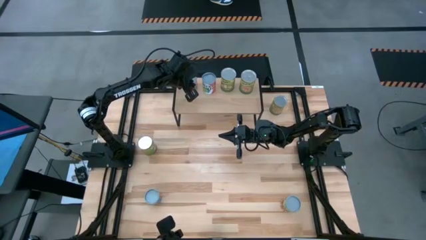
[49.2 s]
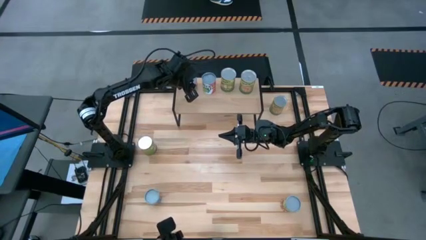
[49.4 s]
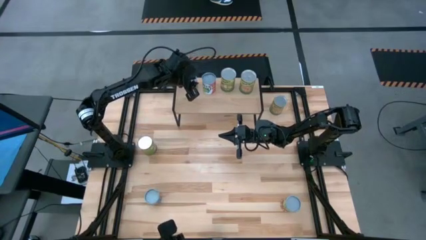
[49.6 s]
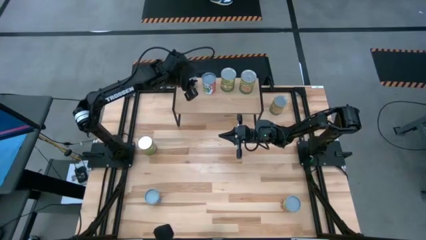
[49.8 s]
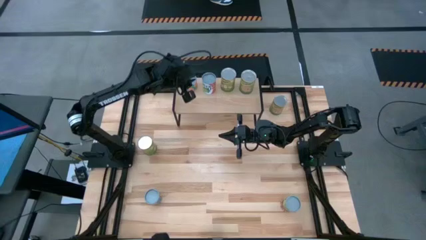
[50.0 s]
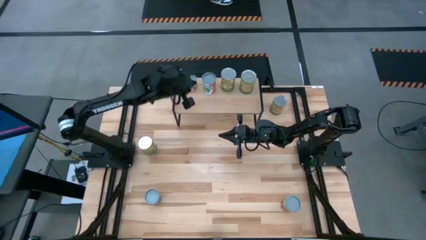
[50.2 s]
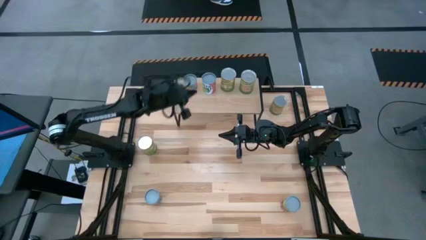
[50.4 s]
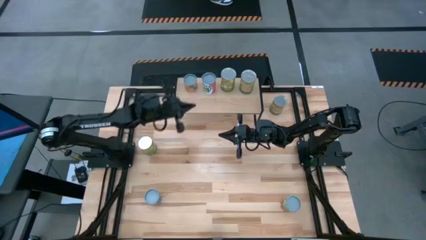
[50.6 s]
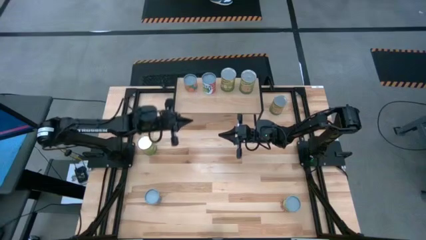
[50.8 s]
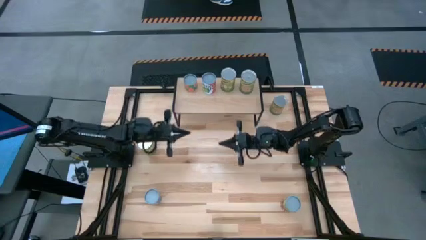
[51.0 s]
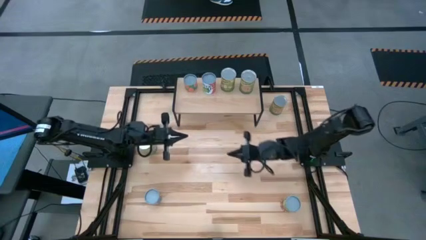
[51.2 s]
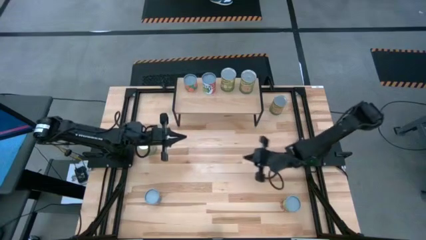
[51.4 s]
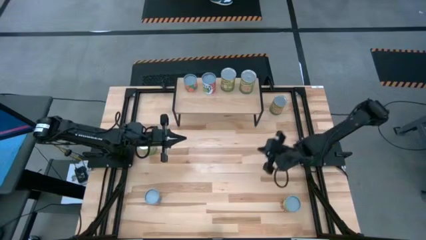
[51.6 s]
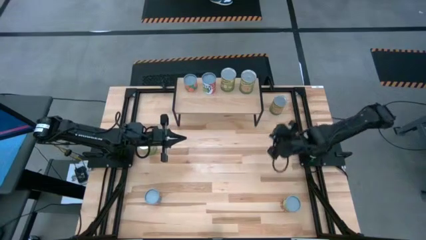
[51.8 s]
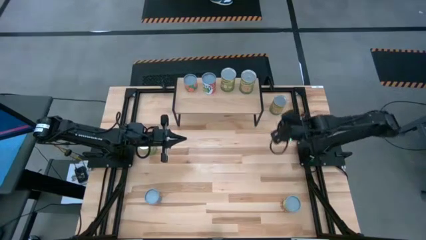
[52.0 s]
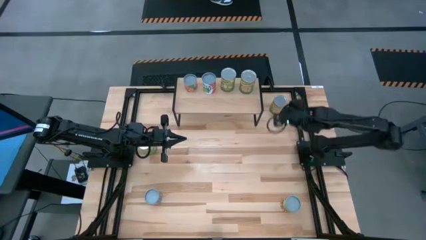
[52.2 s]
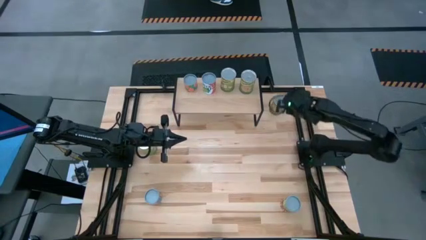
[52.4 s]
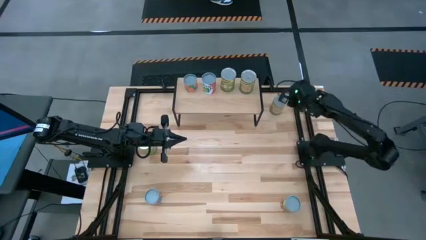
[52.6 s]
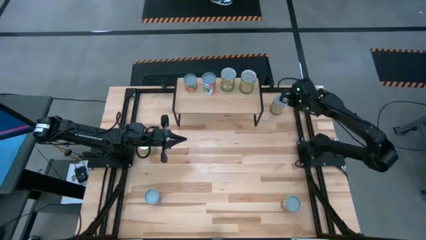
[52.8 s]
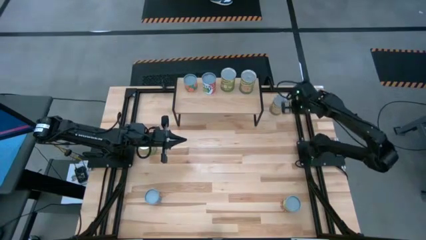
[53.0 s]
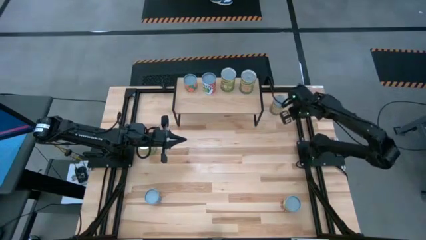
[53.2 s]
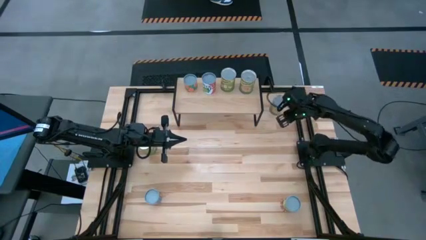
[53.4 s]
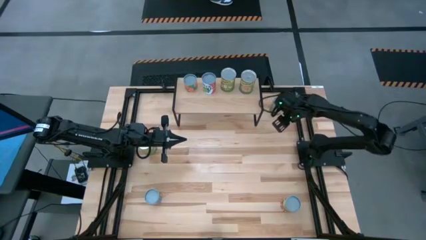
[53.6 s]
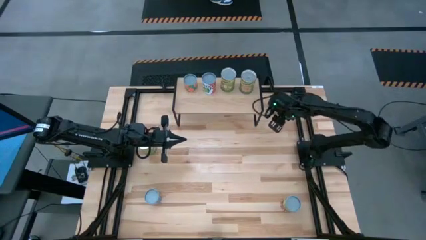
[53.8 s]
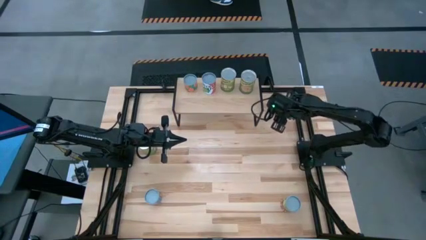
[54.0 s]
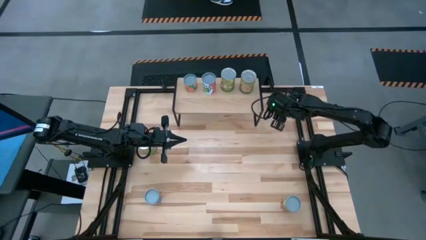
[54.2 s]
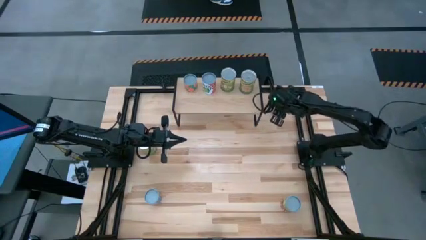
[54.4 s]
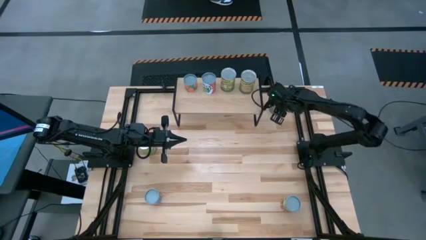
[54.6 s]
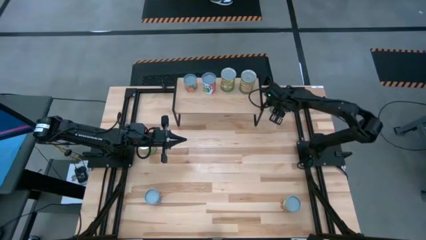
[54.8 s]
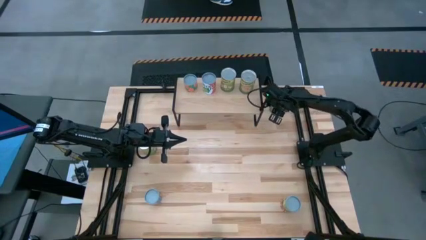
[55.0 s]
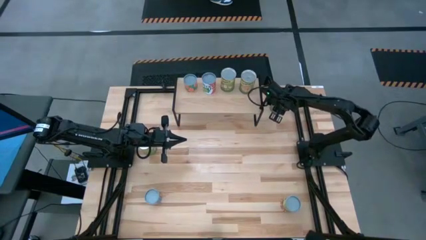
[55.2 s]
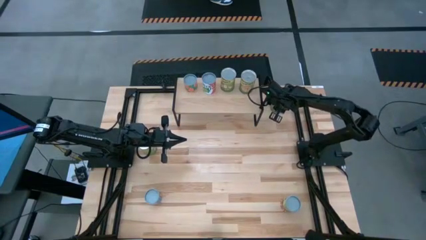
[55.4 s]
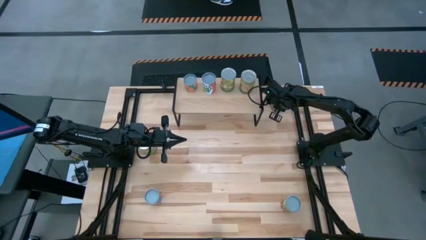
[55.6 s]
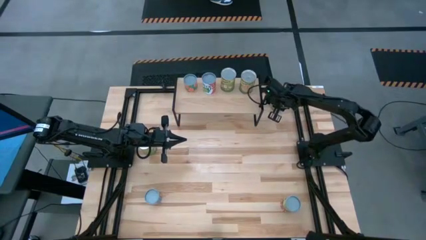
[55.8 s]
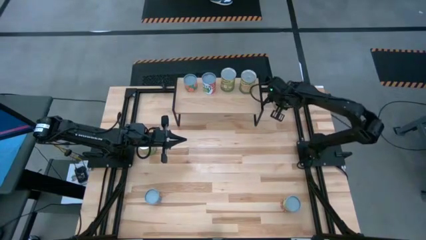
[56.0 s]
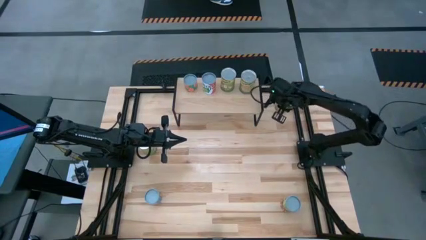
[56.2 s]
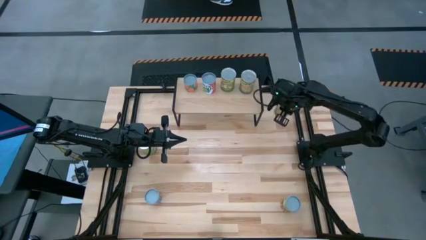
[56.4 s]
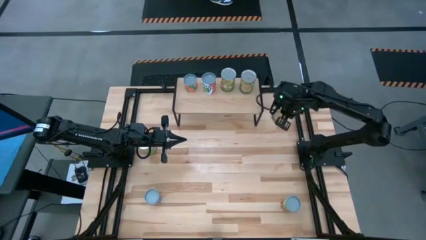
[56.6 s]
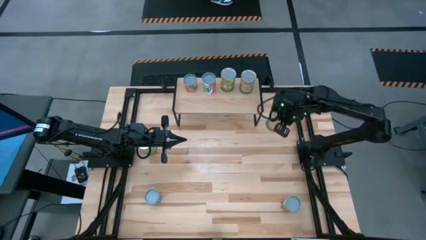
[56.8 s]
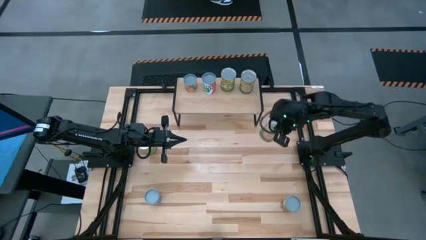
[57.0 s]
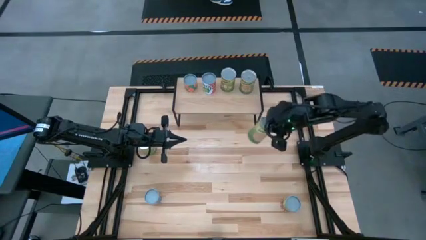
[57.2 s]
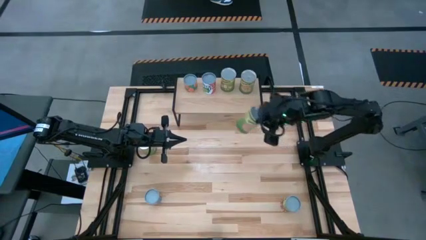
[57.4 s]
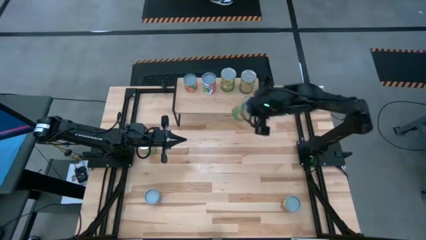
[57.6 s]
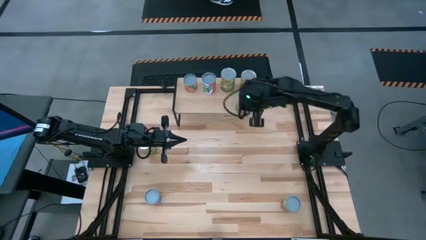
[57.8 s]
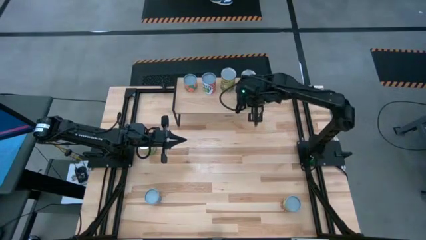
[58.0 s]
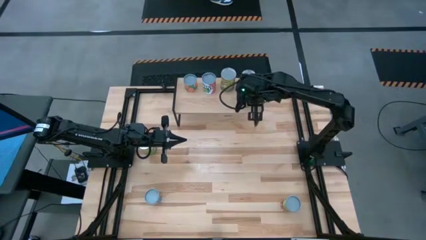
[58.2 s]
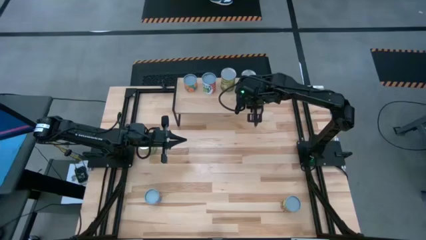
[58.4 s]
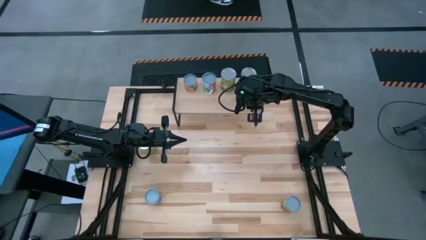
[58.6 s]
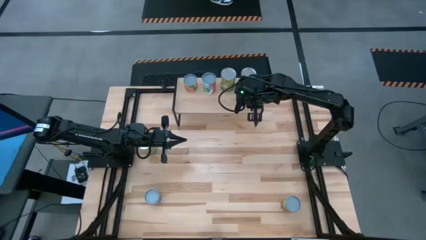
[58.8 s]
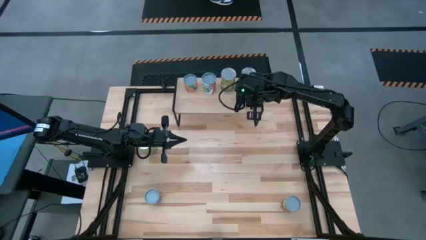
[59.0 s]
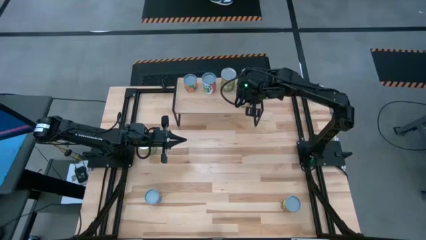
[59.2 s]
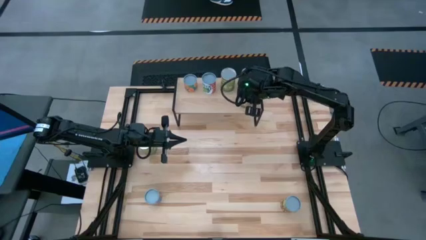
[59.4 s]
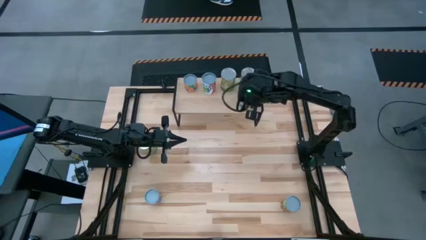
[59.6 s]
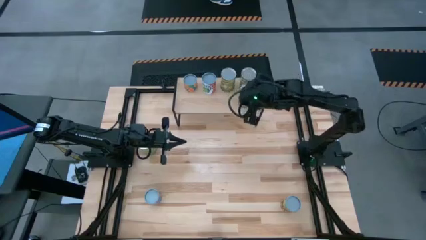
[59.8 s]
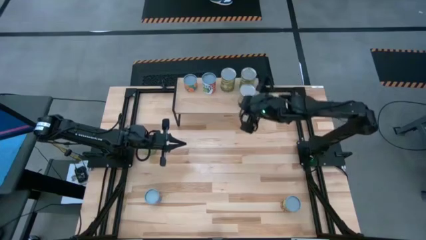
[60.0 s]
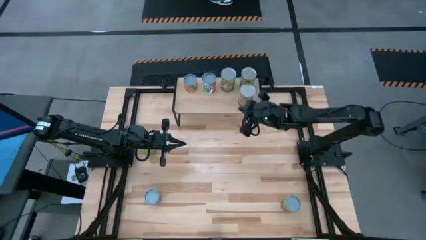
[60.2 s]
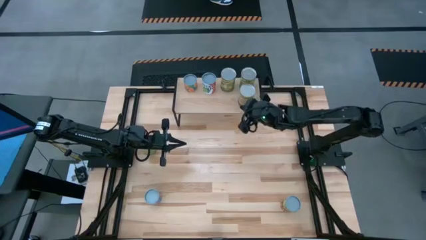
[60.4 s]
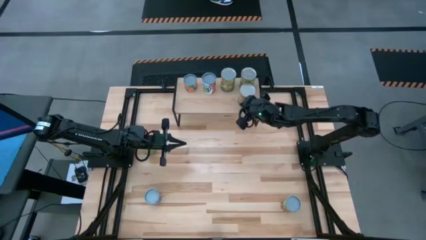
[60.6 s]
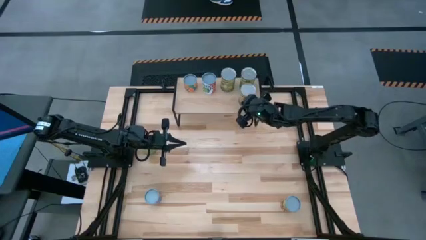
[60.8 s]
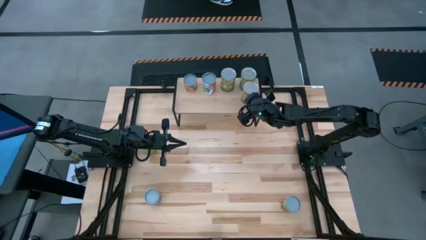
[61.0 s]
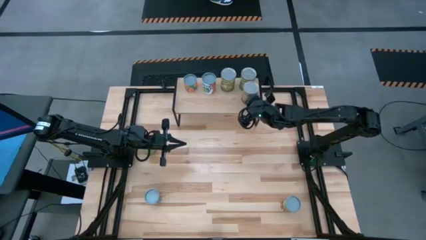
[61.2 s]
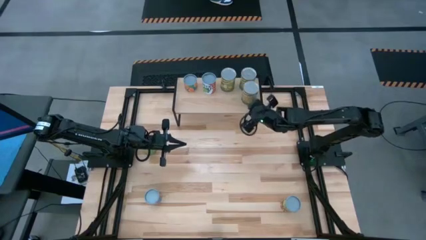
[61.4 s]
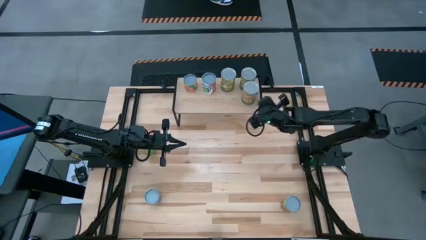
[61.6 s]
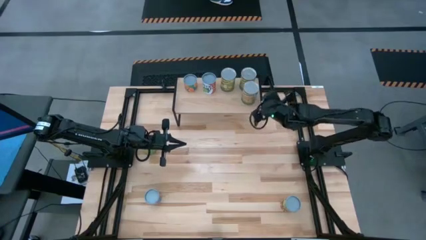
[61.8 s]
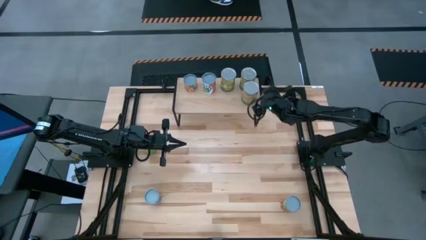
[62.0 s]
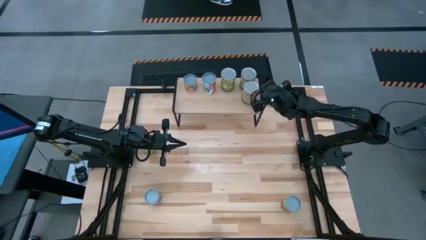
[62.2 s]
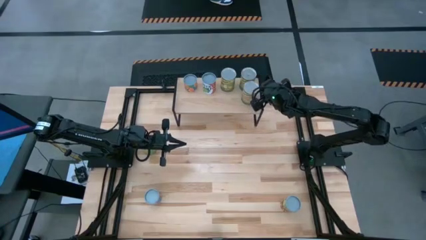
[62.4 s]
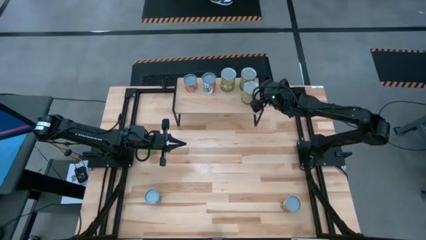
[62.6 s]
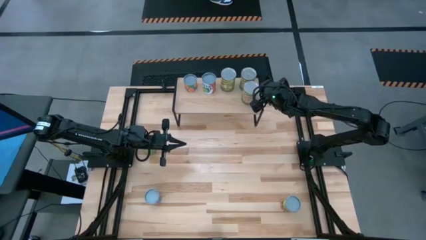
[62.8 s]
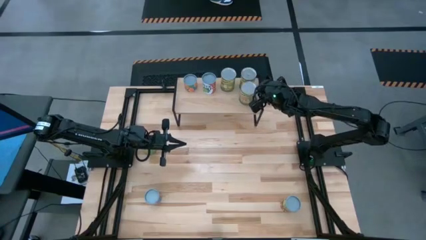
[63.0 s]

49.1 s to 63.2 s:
Task: Pick and place cans onto a shelf
Put the canned oranges on the shelf

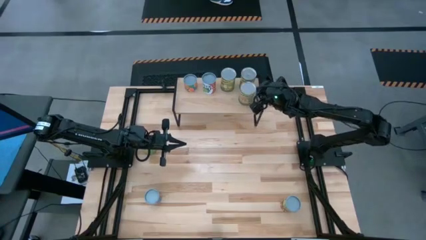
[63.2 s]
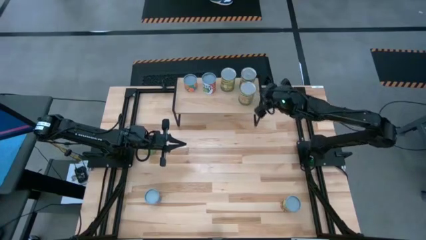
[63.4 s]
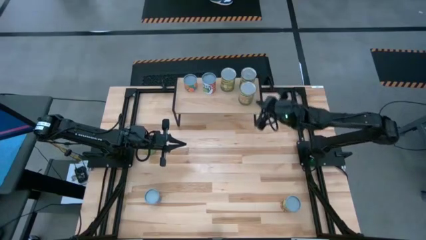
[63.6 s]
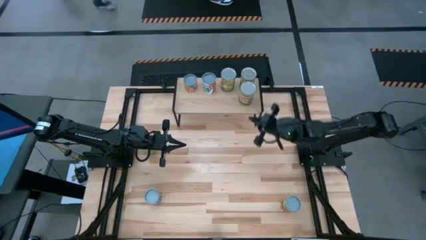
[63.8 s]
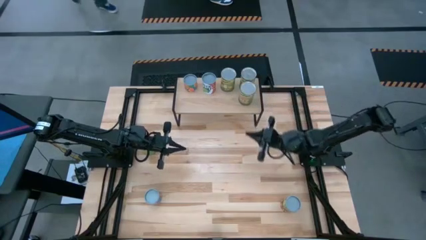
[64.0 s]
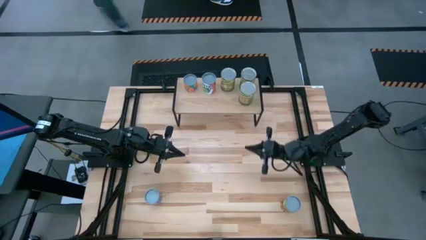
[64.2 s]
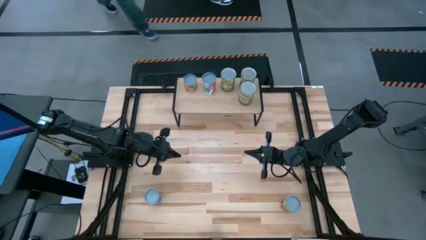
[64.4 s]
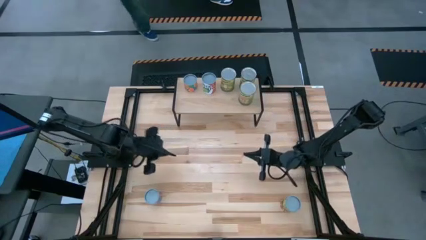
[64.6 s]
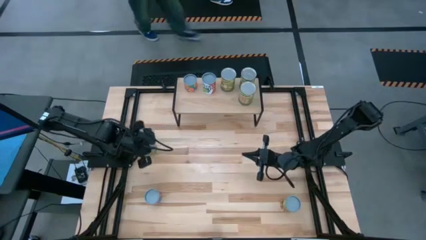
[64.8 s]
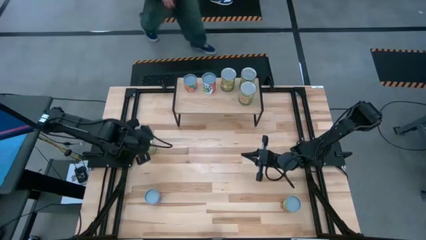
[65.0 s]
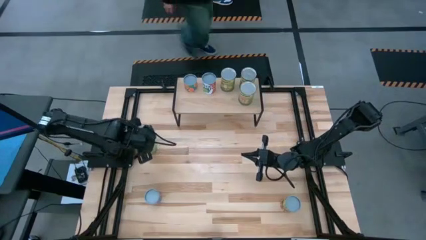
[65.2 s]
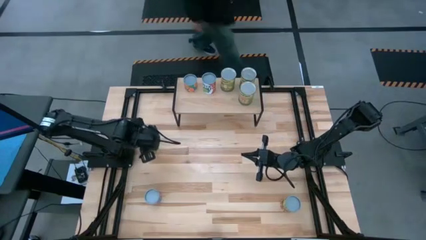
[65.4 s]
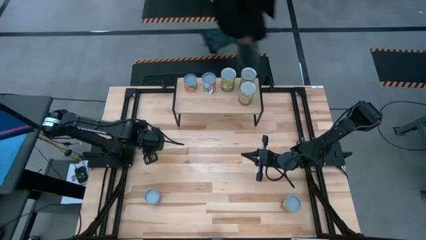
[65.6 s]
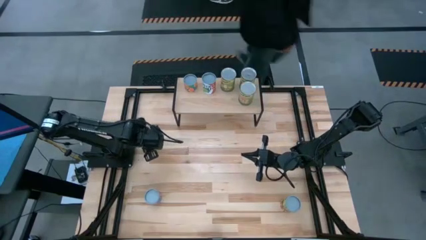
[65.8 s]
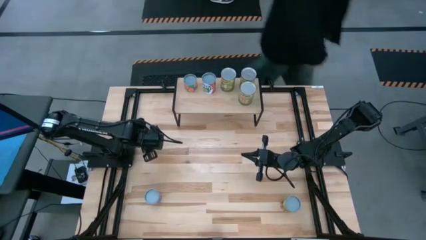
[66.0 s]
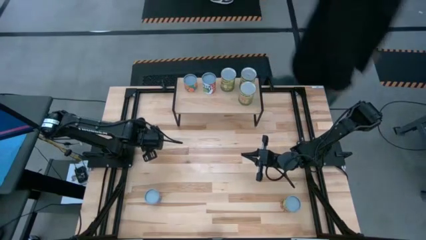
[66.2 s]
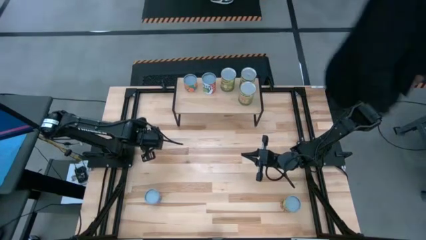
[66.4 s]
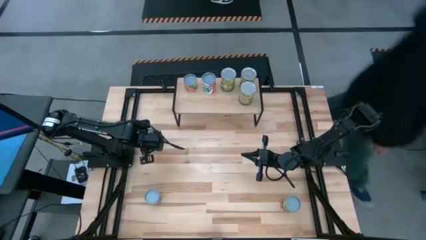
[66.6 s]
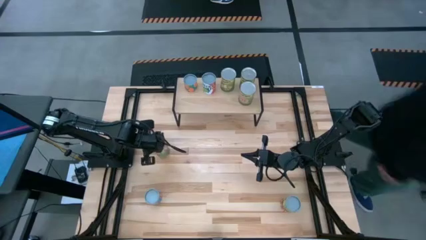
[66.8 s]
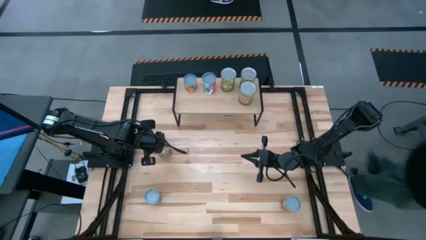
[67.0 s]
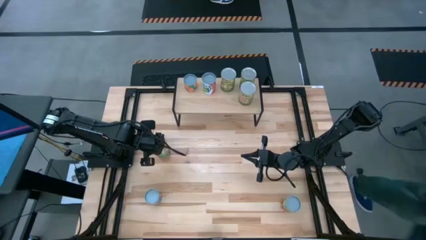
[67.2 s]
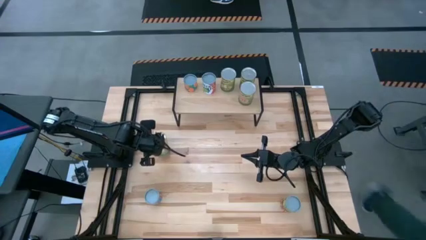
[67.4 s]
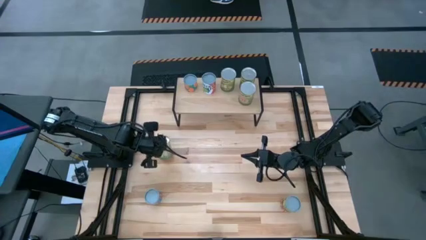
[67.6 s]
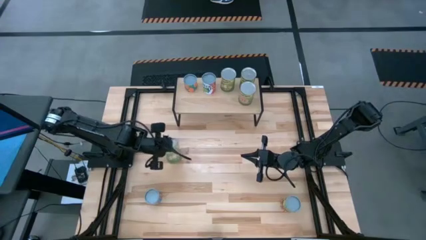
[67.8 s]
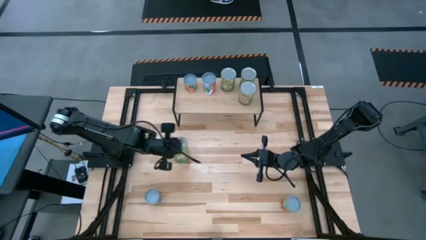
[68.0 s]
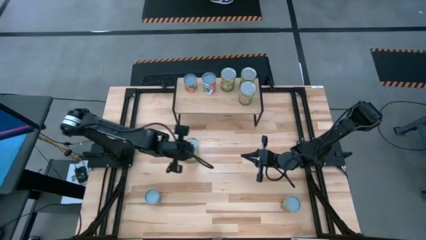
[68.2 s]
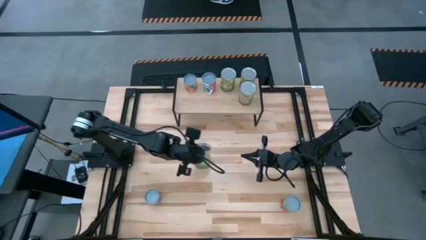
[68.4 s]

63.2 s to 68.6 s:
Put the canned pears on the shelf
